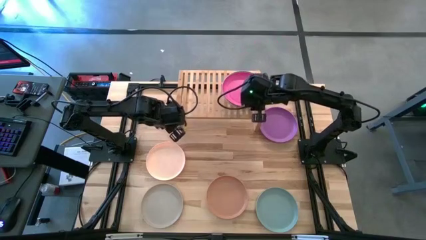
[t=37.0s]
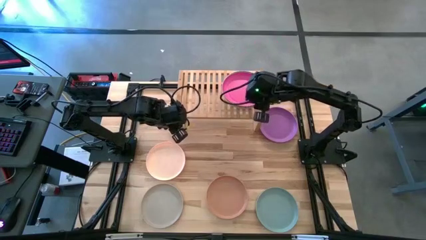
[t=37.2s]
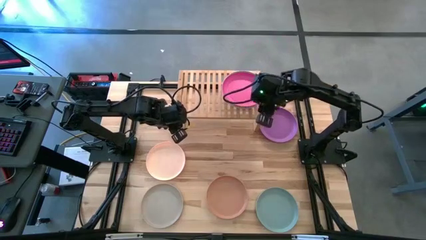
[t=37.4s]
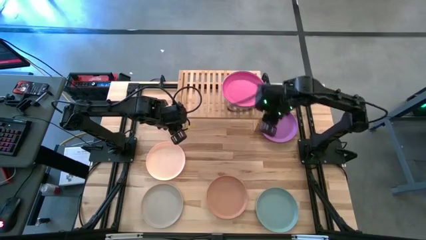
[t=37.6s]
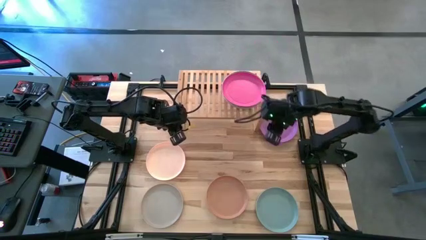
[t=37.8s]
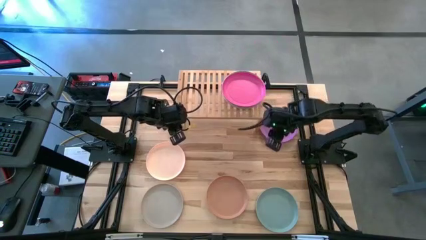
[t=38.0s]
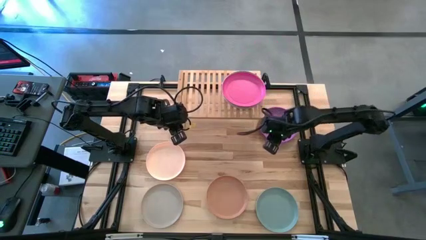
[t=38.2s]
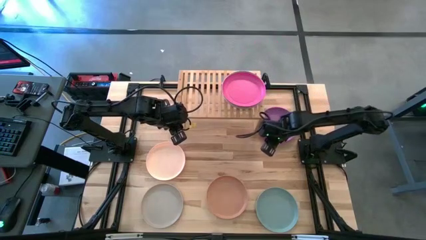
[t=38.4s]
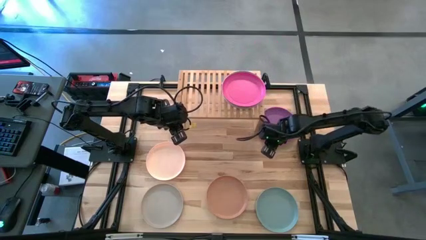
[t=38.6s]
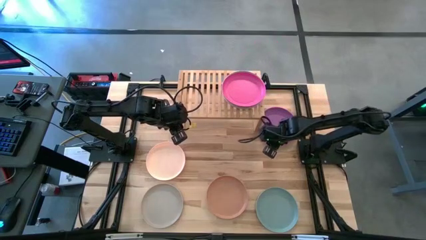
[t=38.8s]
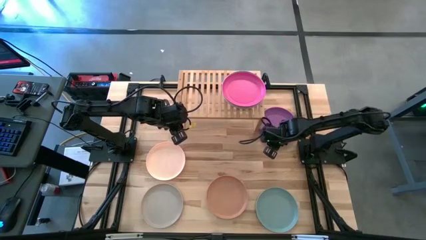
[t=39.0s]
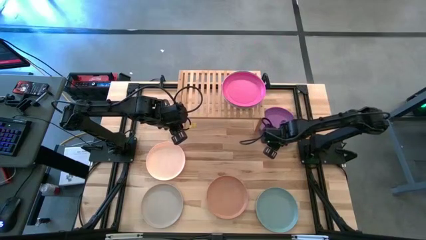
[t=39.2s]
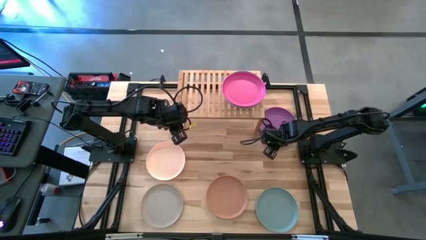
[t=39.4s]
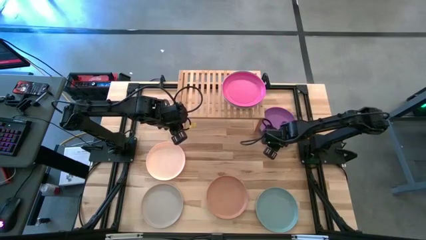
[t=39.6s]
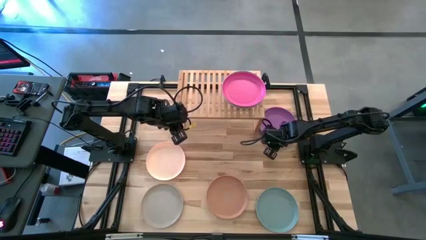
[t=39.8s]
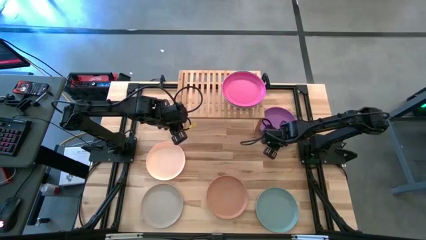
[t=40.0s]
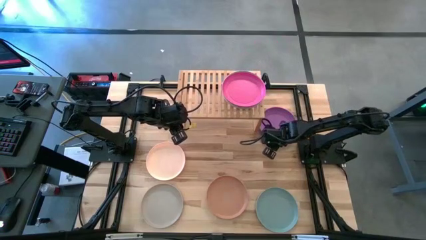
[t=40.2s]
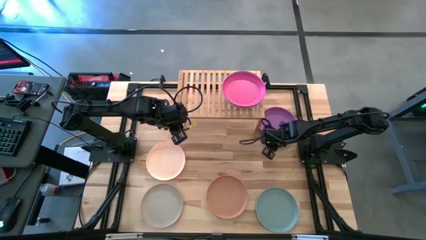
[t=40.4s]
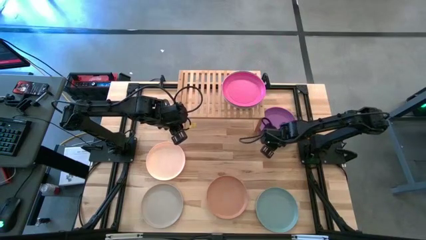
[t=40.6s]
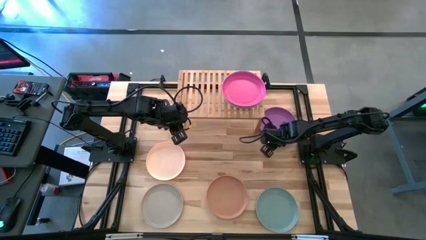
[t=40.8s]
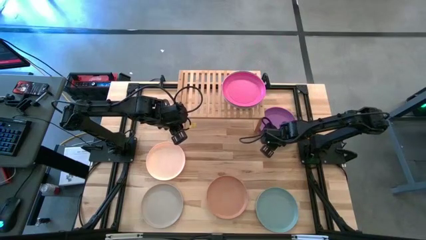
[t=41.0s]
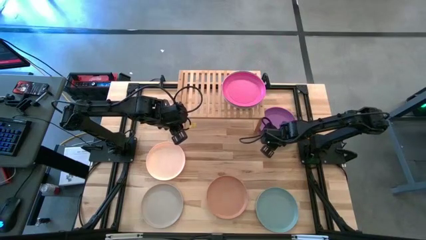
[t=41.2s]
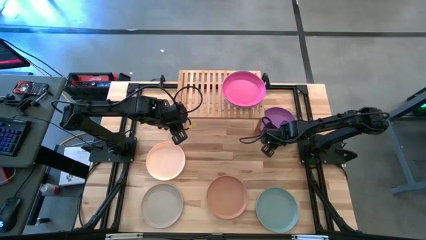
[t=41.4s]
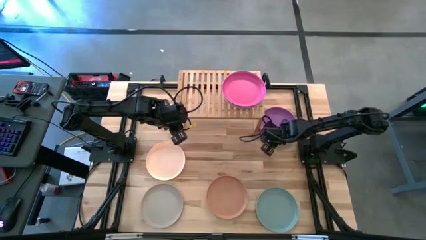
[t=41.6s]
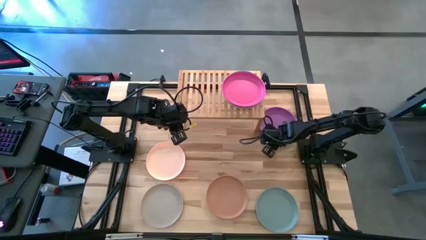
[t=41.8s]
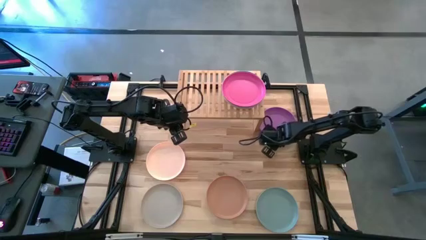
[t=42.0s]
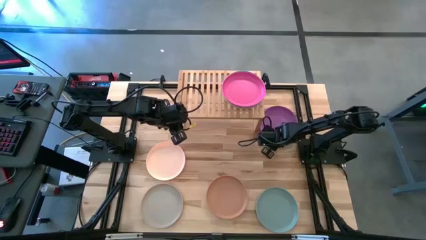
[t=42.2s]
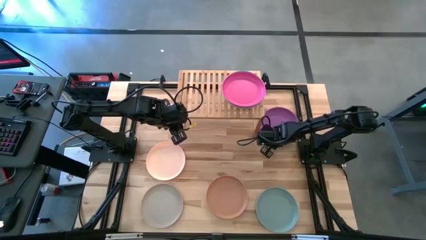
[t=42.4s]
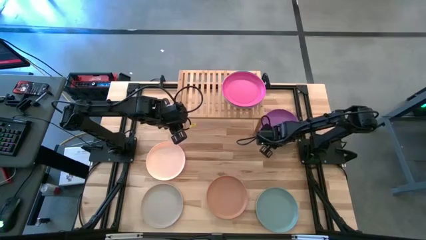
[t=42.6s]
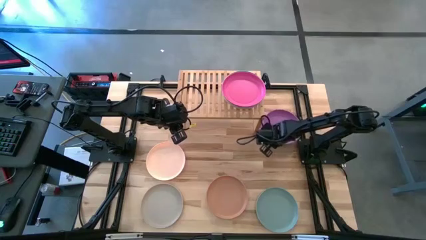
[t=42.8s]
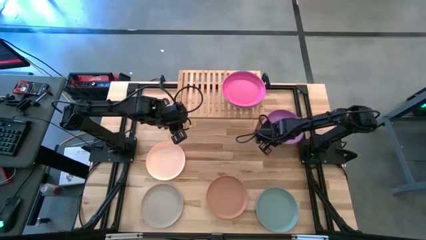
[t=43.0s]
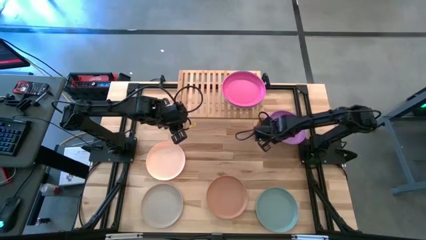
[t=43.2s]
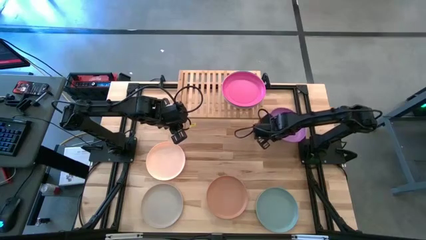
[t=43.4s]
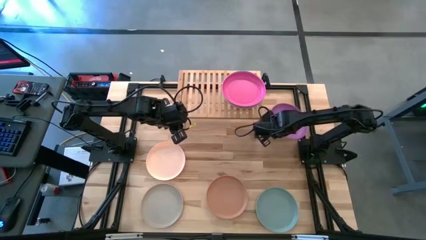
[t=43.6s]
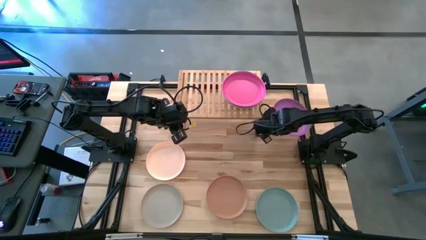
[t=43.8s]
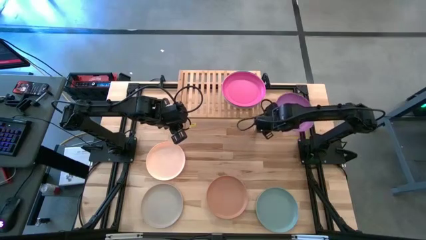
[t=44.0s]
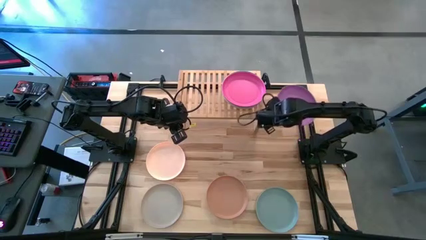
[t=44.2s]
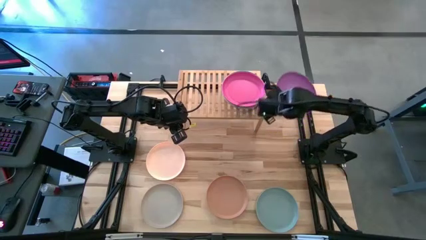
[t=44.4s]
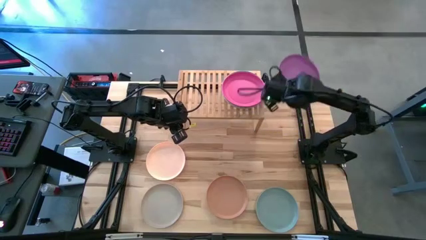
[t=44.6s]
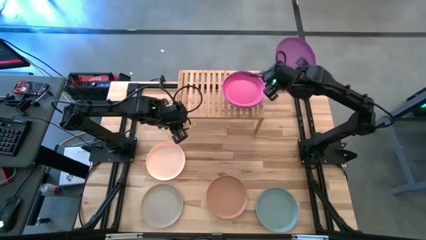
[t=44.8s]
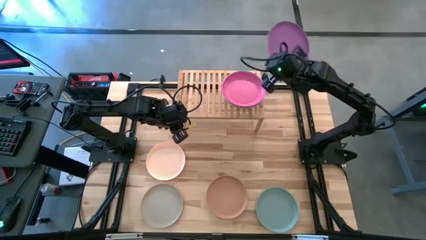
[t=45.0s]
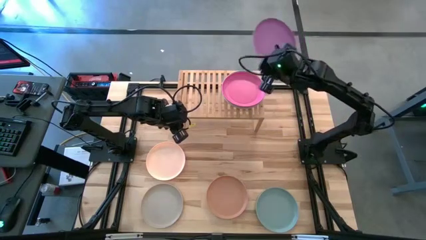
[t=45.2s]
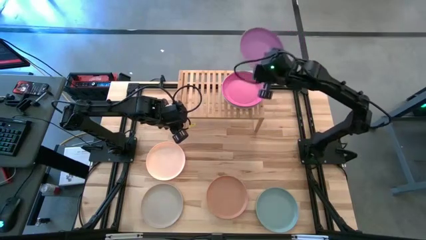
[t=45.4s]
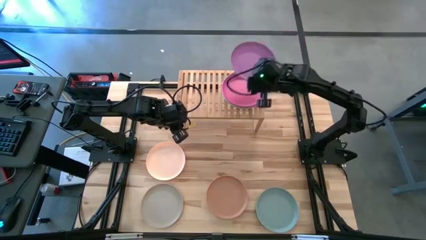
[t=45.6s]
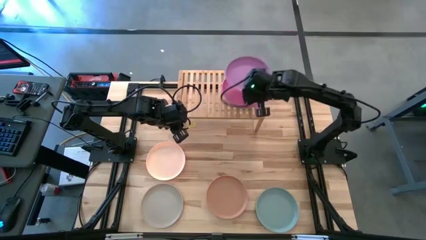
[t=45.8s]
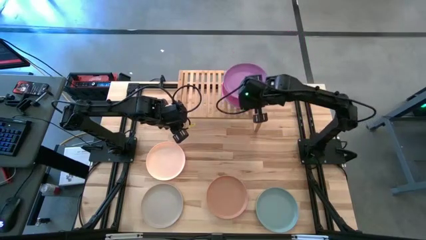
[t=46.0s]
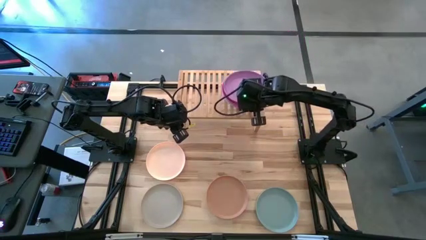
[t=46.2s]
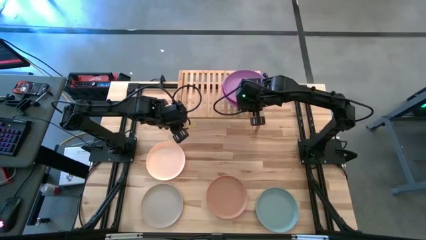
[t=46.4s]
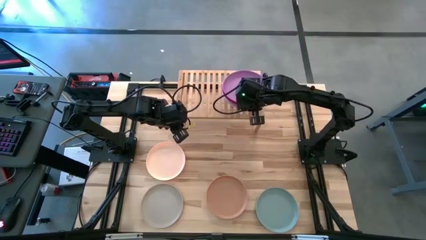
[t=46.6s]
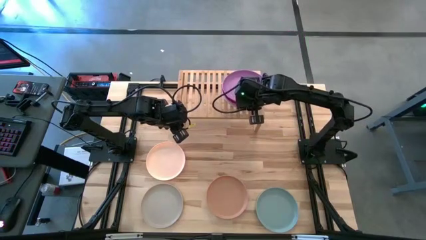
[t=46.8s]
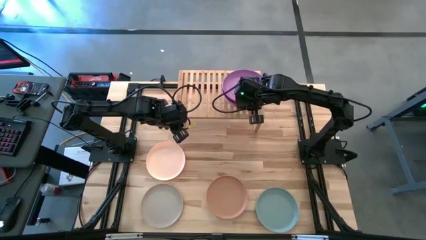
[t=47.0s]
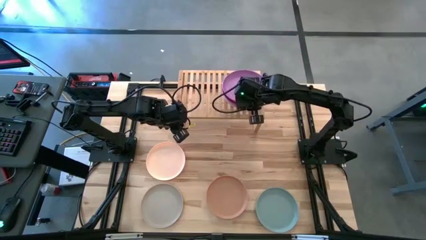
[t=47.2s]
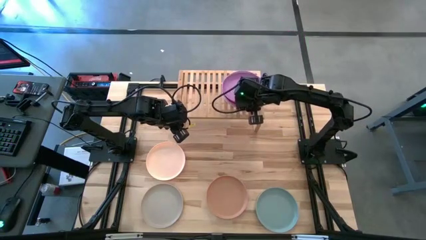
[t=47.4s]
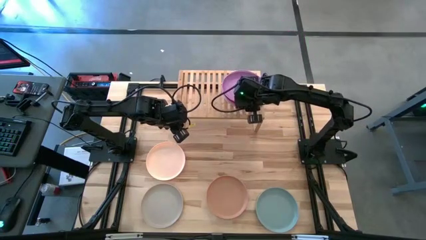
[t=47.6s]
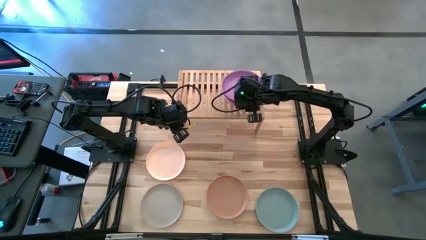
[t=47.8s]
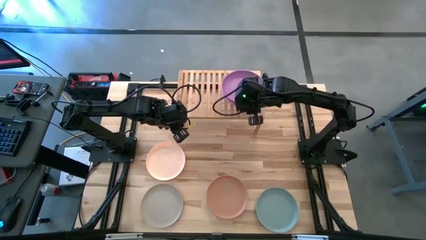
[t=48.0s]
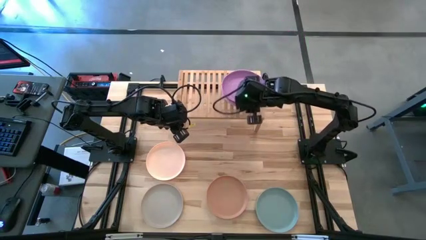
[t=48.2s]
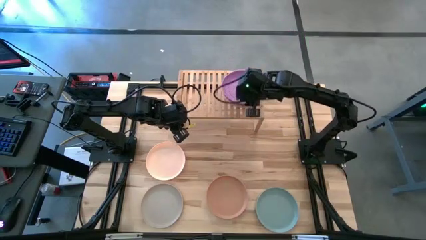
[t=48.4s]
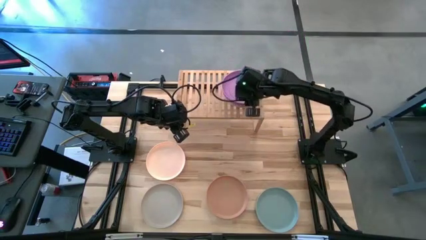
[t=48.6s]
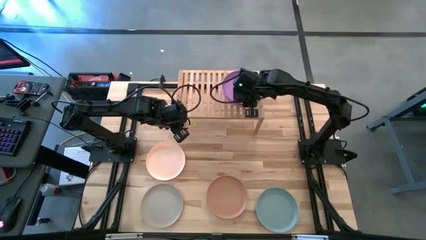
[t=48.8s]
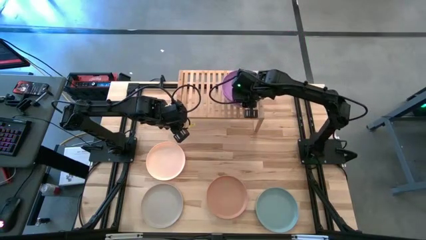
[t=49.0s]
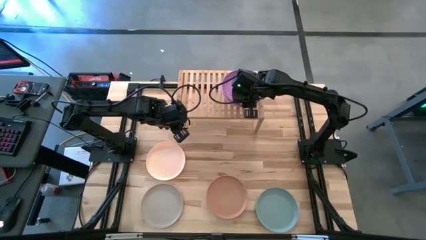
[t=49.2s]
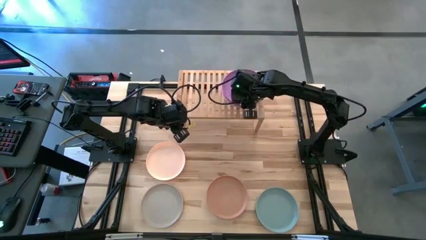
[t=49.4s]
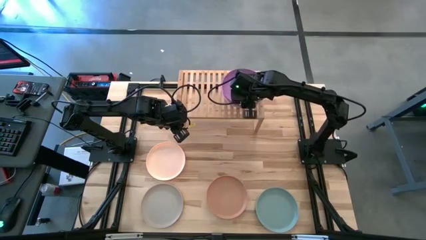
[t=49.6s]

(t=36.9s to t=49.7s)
Task: Place and stack plates onto a shelf
Stack the purple plate on the pink plate on the shelf
